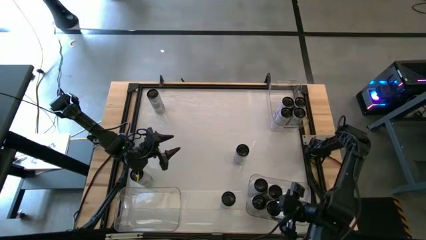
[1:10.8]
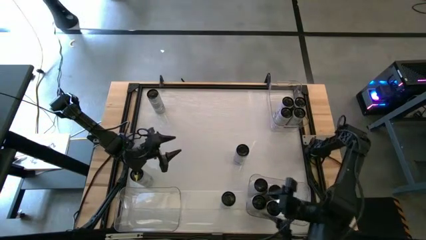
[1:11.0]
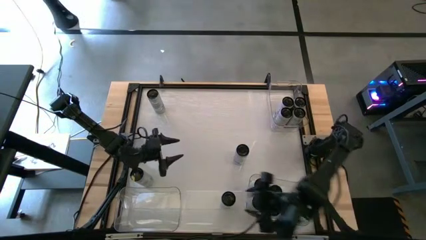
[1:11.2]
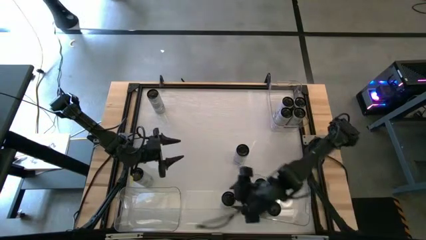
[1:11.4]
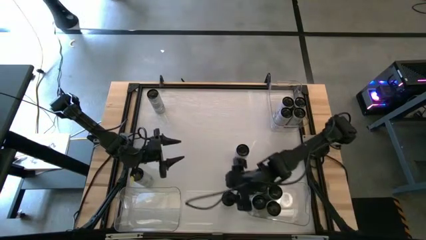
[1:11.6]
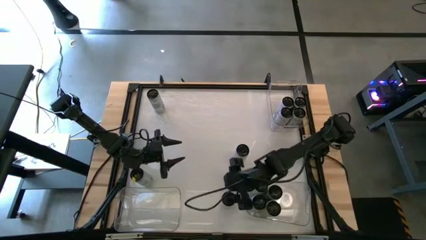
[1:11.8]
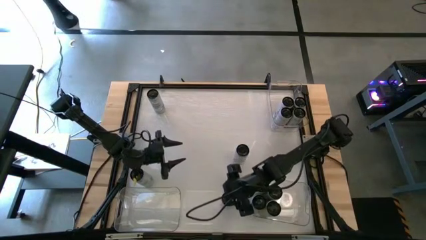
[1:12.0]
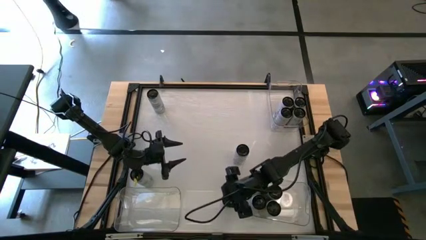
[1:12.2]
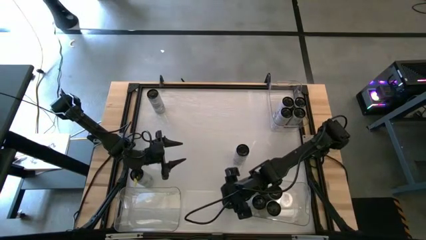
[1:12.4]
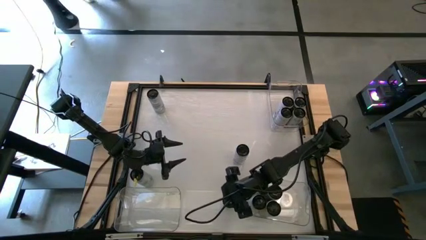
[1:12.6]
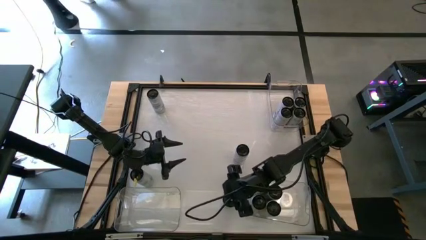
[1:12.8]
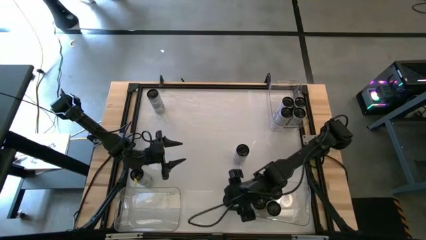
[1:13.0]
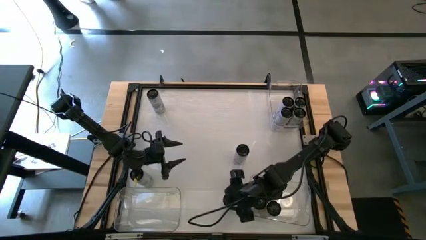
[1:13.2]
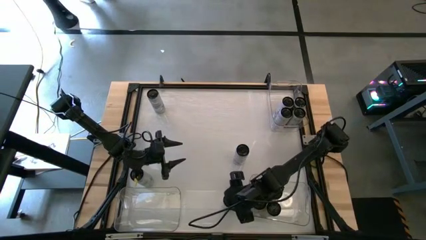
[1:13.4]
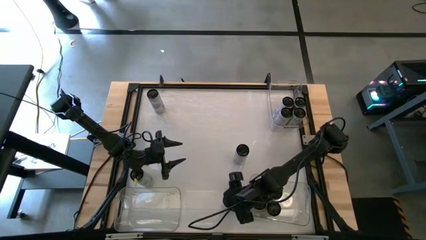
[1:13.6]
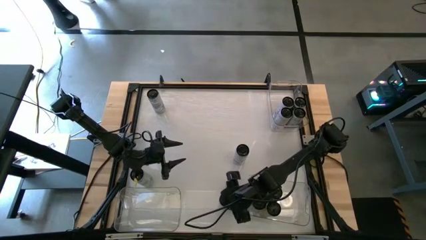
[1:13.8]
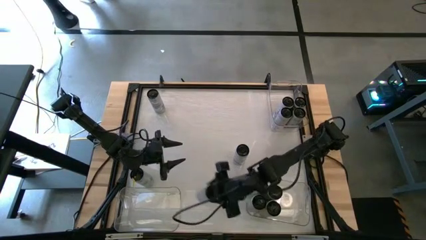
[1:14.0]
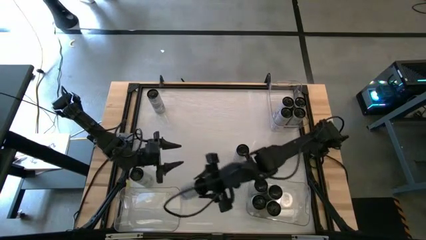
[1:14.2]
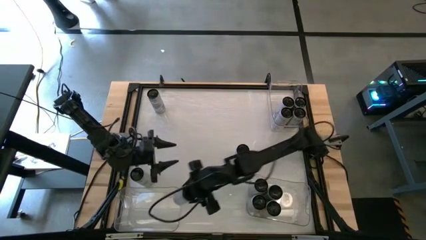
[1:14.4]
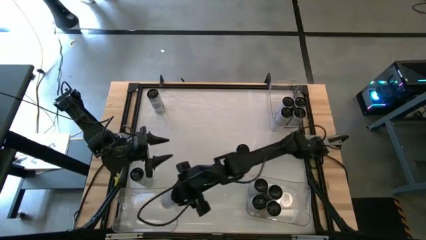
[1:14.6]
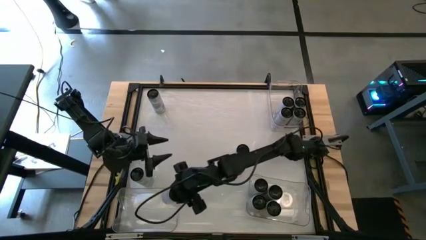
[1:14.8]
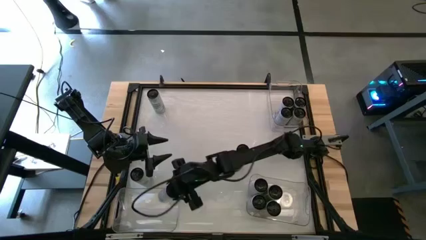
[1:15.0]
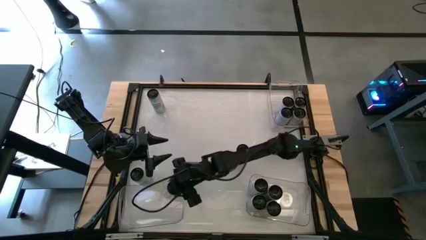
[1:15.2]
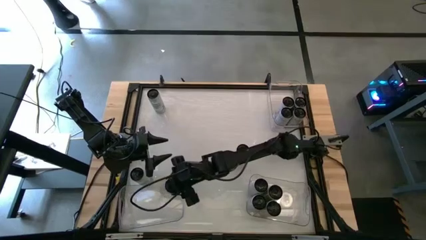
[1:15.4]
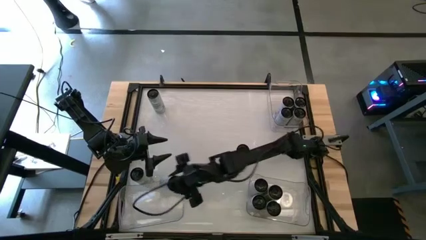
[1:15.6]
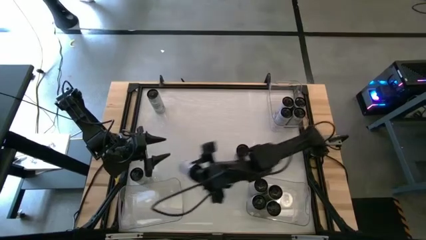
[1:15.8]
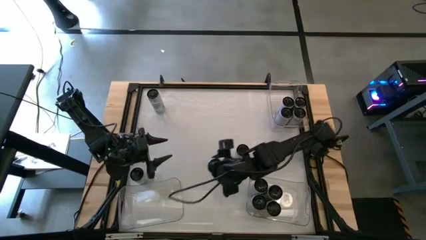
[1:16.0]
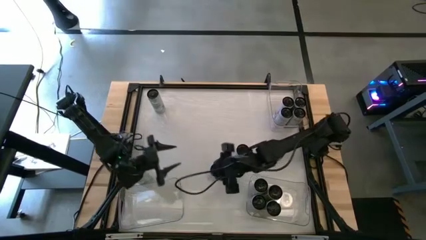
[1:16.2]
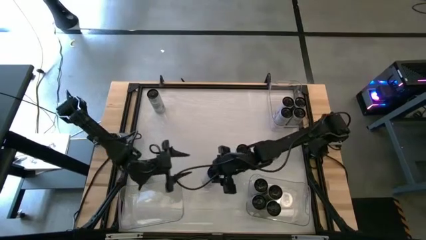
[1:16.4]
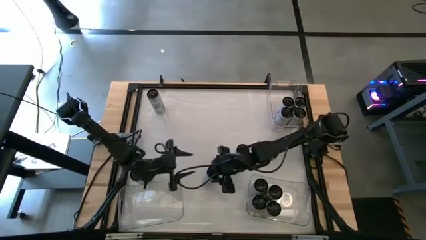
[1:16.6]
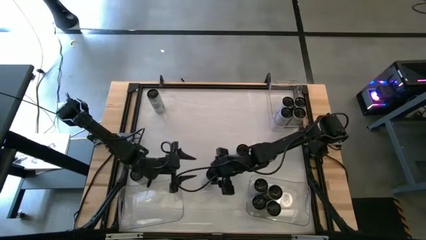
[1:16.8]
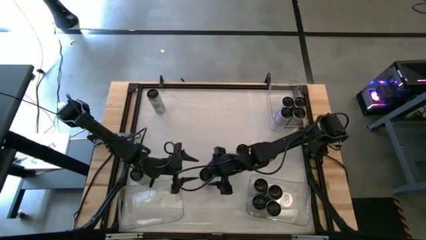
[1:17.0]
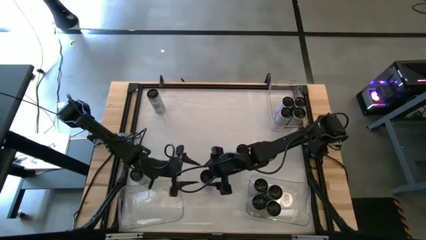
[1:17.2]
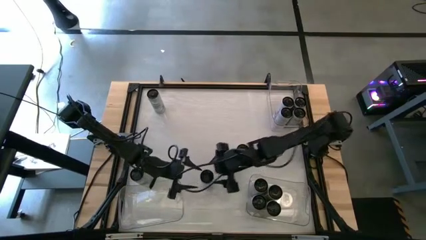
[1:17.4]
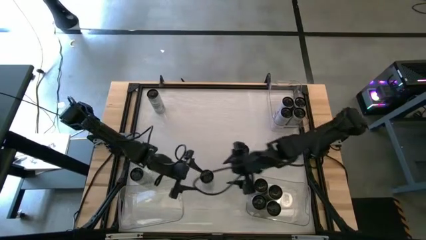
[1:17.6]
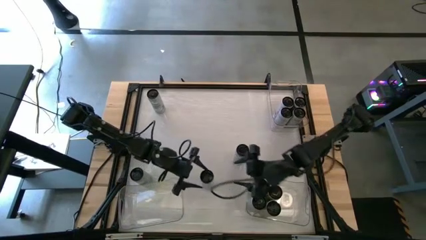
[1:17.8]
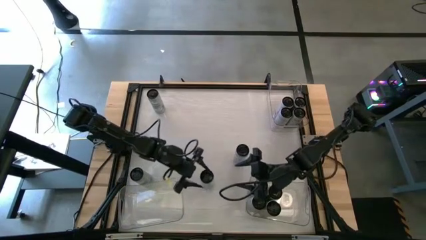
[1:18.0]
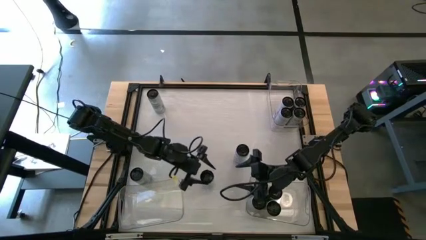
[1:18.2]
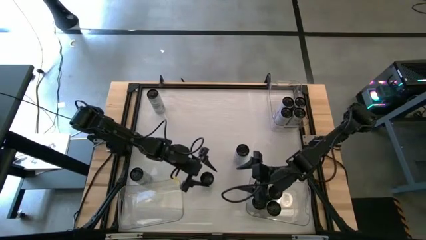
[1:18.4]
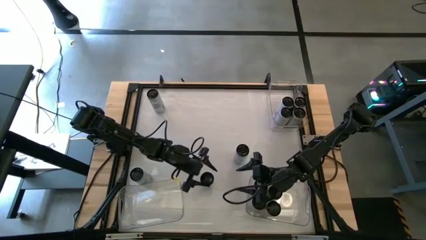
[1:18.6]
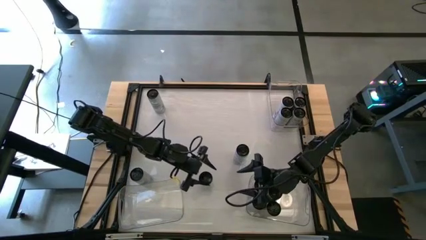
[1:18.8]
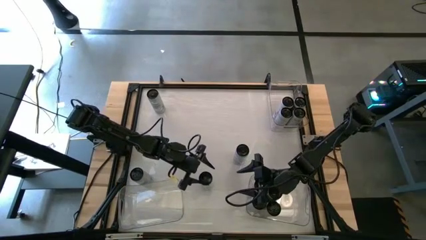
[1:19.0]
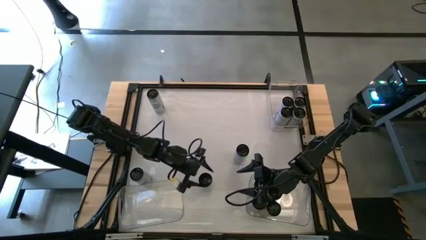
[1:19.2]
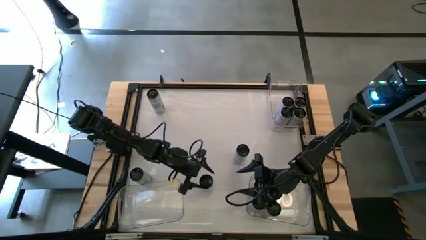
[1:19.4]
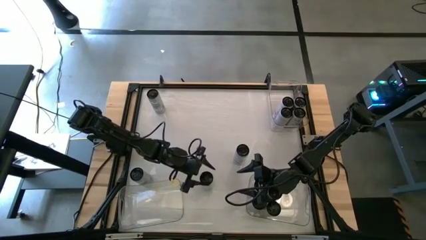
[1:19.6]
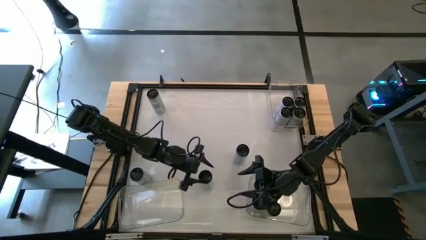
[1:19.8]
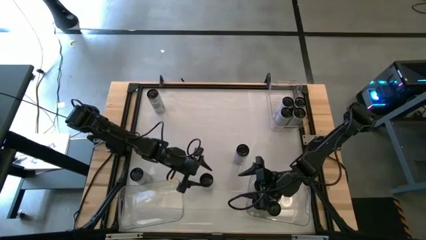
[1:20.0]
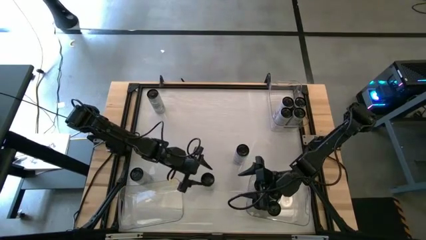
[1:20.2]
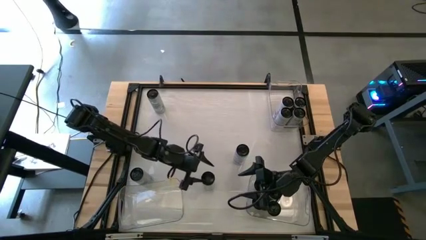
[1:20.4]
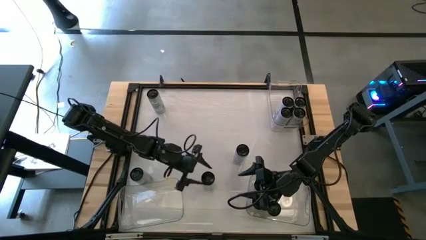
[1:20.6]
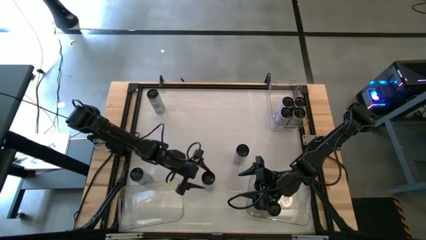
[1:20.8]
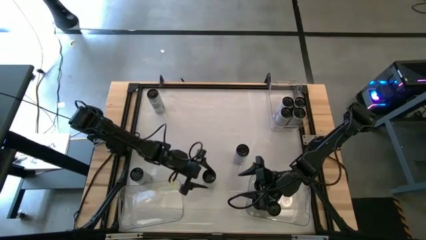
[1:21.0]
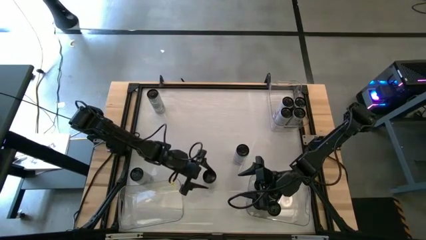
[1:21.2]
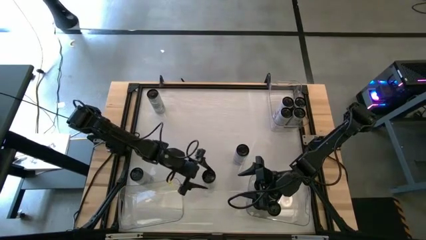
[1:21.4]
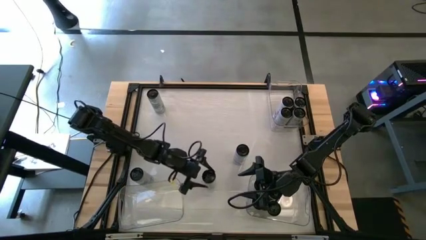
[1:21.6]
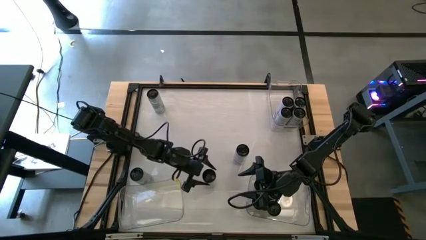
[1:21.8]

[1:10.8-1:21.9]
Task: Sort soda cans
Put the bottom white-blue soda can into the bottom left transparent bin
